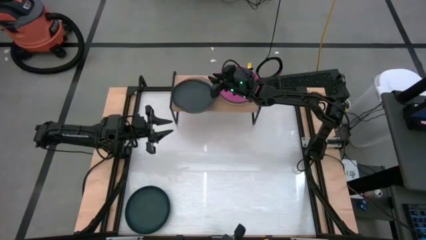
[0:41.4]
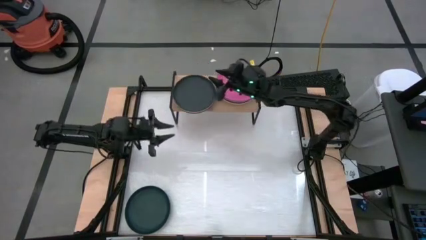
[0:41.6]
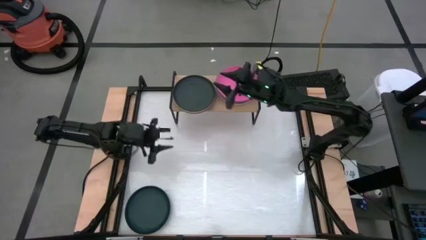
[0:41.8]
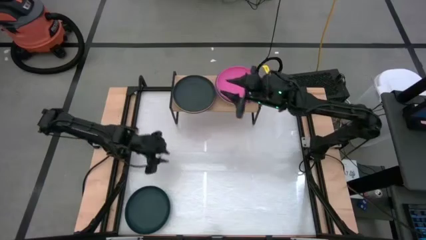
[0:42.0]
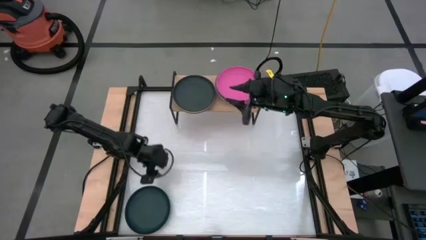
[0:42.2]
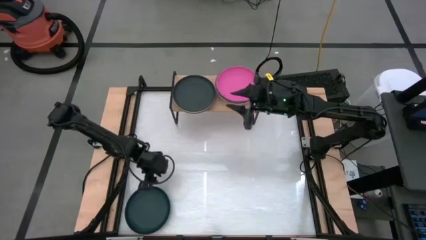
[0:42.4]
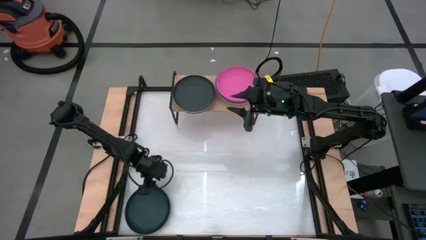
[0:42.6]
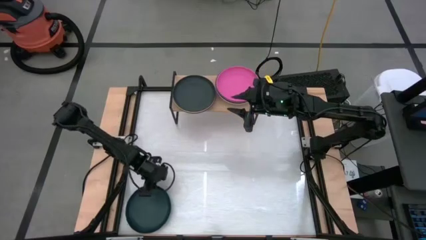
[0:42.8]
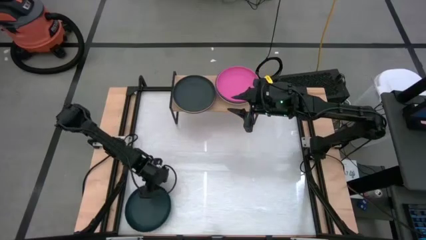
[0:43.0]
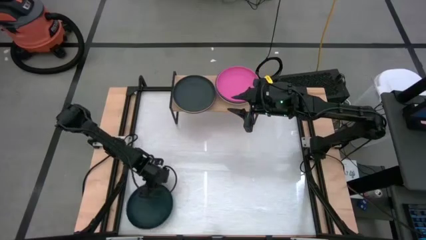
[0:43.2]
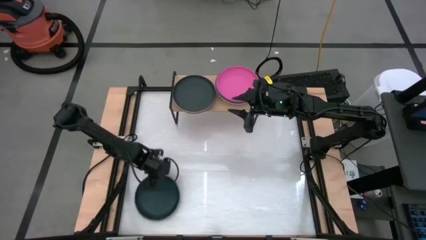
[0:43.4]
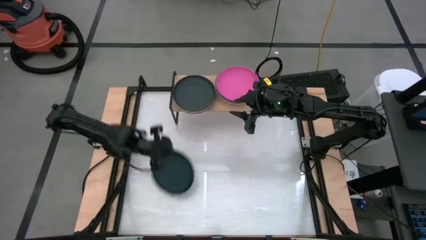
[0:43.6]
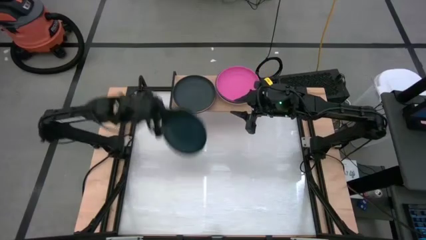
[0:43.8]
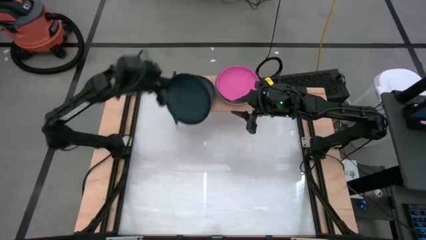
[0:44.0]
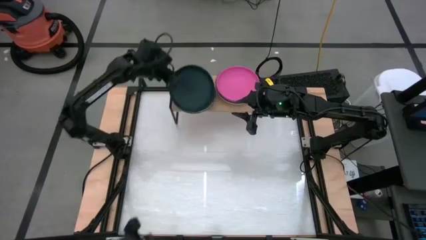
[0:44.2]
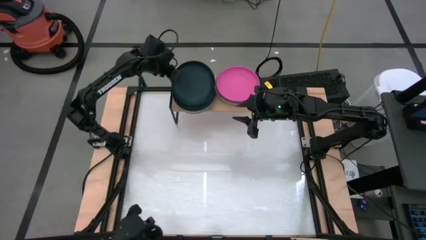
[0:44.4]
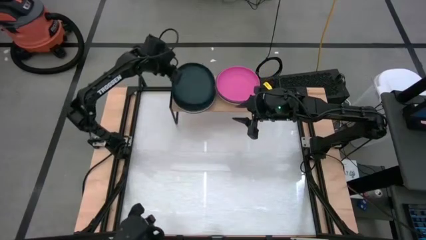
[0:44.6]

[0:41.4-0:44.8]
Task: Place and stack plates onto a shelf
Stack the black plate on top of the black plate on the shelf

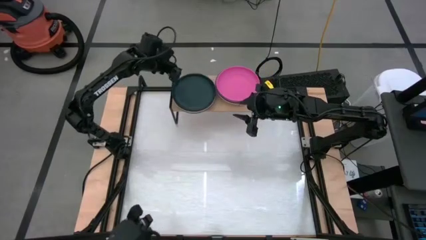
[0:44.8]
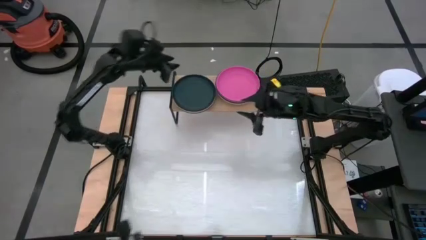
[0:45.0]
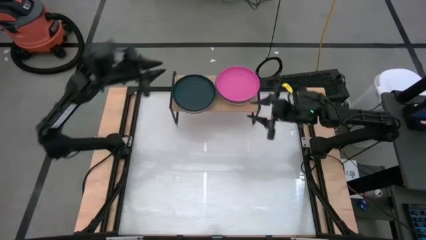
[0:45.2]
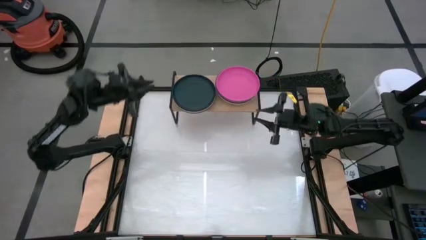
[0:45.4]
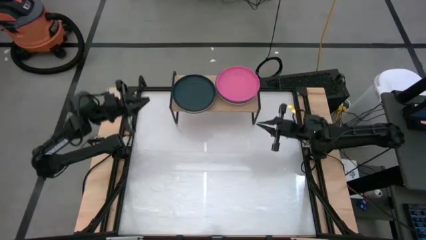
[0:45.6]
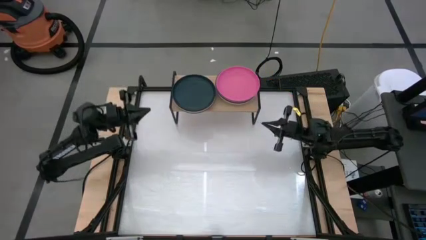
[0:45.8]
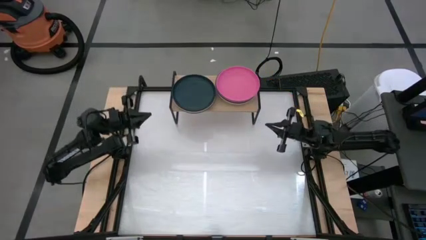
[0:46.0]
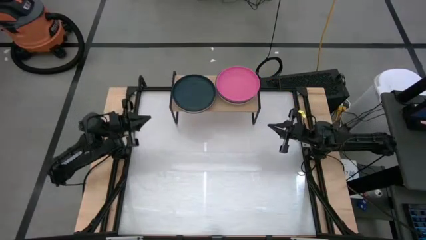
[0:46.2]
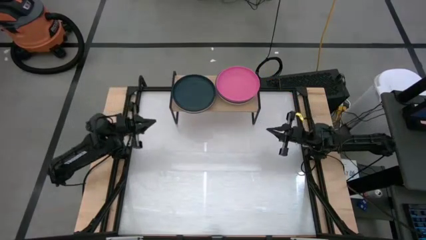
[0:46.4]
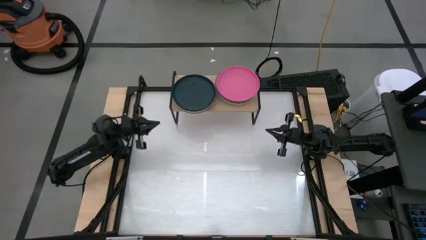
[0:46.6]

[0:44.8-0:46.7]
Return to Home Position

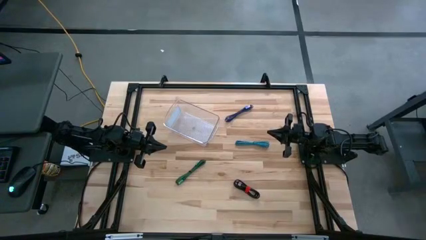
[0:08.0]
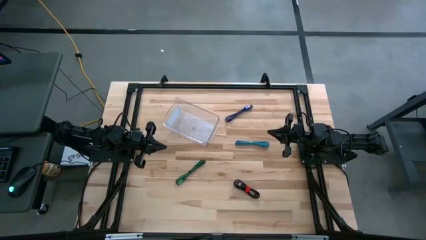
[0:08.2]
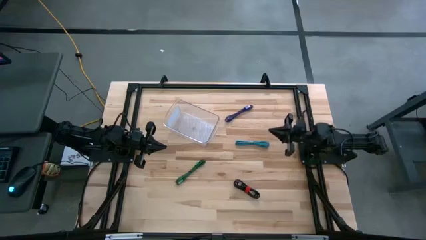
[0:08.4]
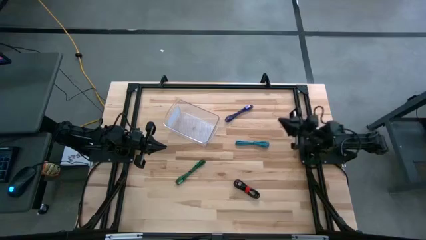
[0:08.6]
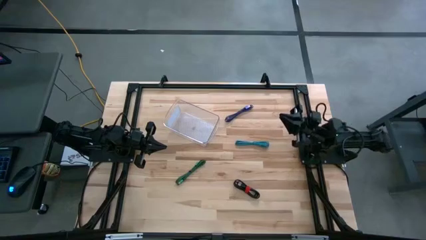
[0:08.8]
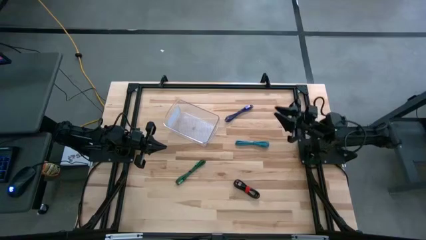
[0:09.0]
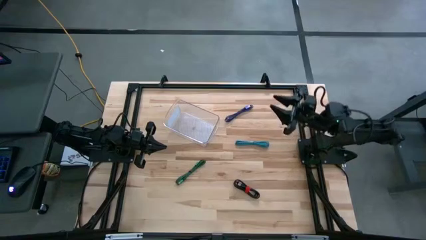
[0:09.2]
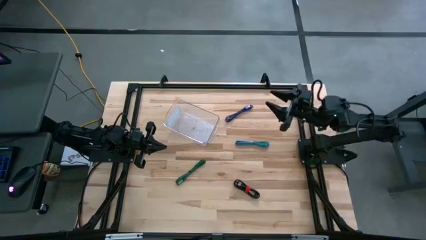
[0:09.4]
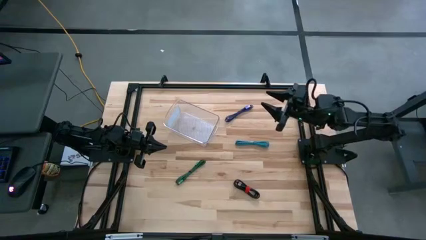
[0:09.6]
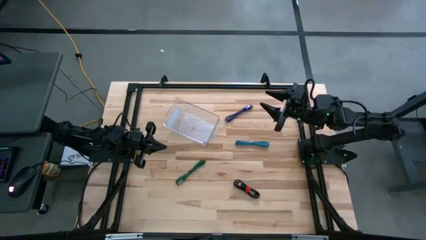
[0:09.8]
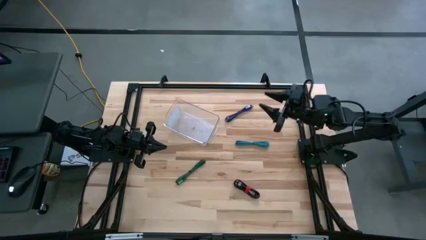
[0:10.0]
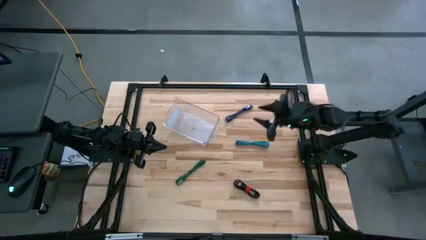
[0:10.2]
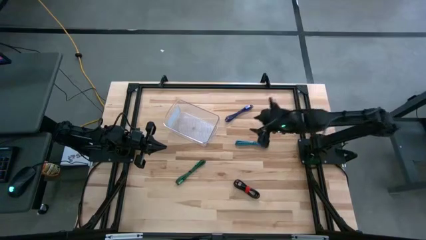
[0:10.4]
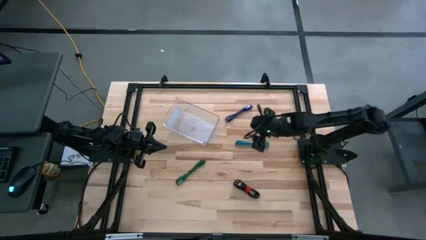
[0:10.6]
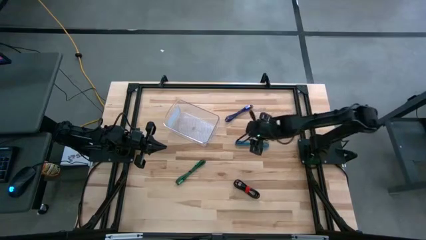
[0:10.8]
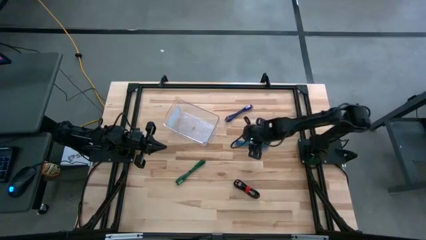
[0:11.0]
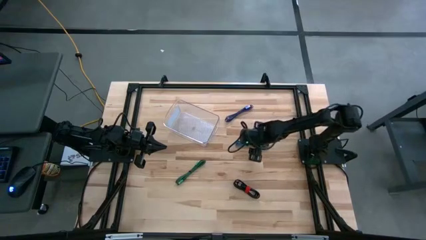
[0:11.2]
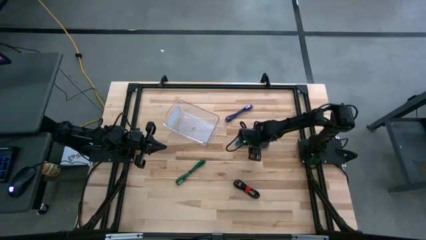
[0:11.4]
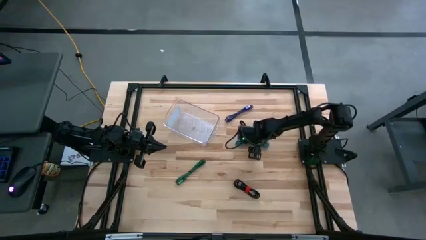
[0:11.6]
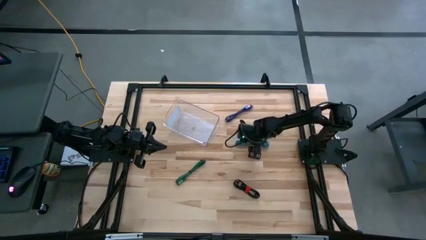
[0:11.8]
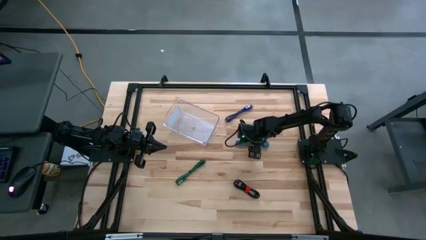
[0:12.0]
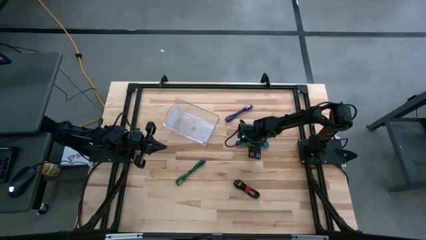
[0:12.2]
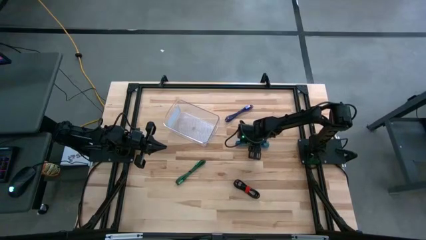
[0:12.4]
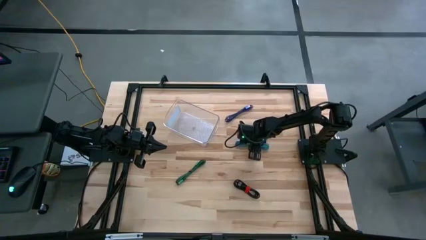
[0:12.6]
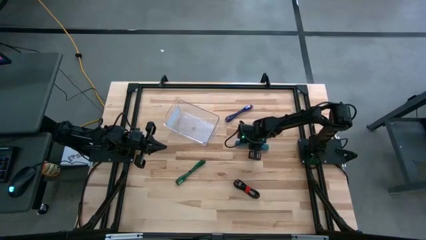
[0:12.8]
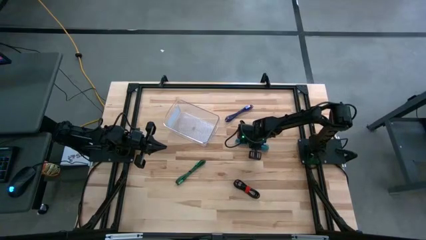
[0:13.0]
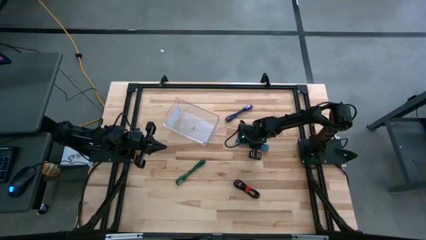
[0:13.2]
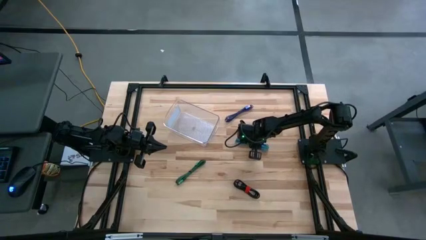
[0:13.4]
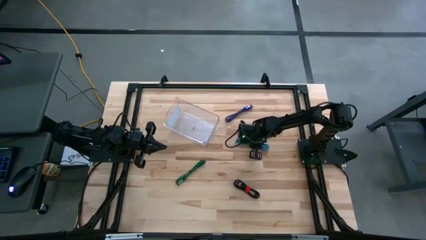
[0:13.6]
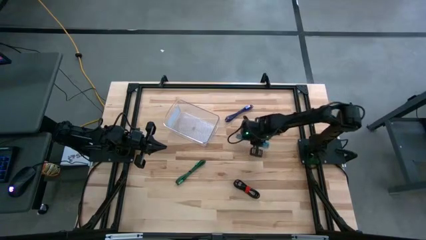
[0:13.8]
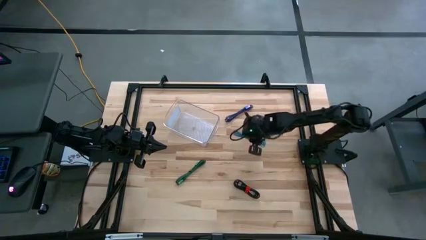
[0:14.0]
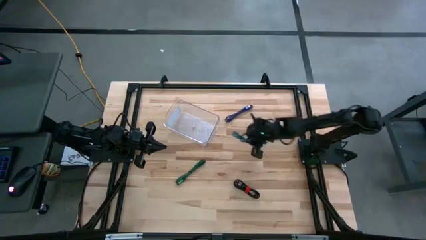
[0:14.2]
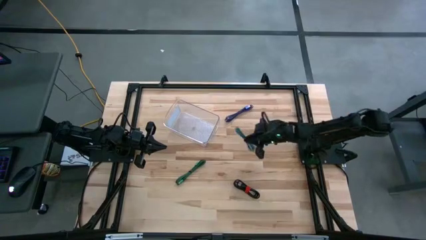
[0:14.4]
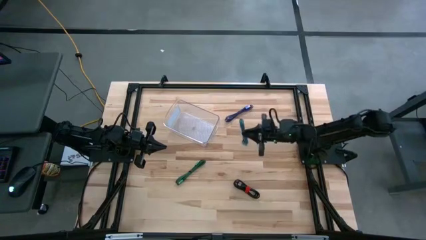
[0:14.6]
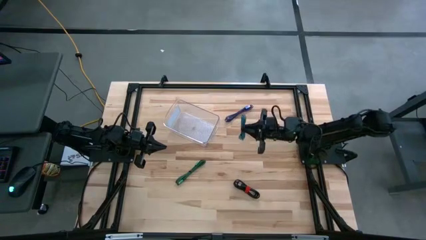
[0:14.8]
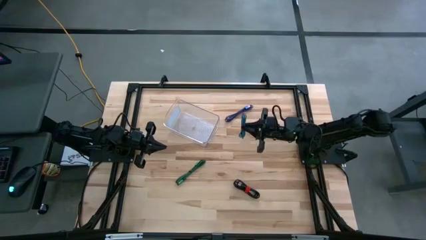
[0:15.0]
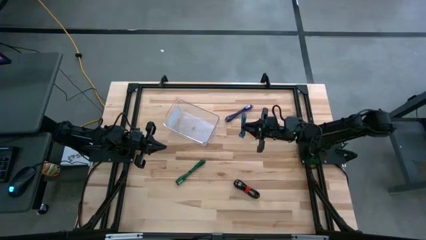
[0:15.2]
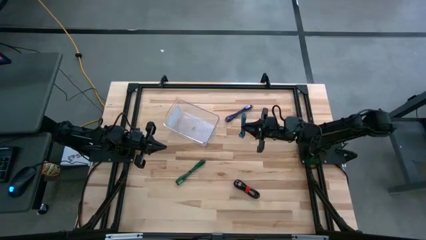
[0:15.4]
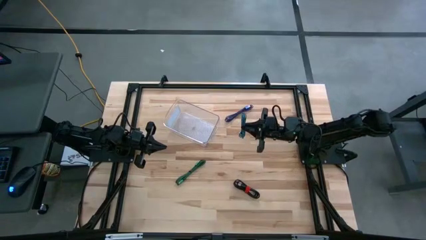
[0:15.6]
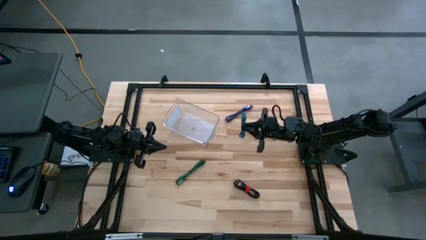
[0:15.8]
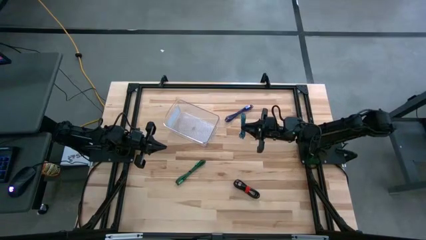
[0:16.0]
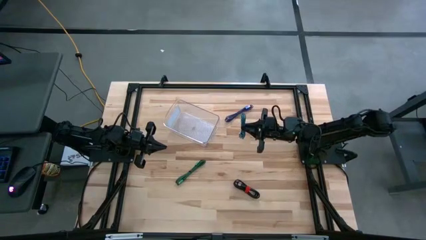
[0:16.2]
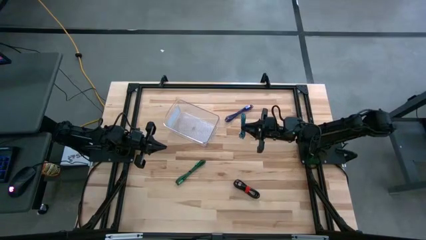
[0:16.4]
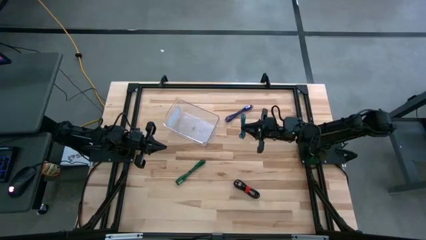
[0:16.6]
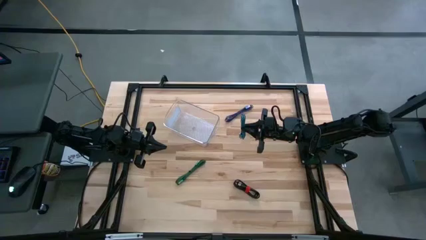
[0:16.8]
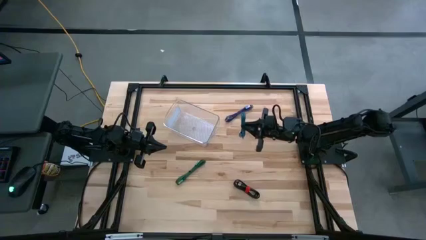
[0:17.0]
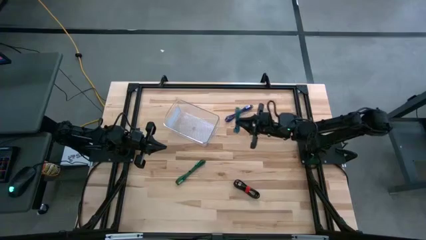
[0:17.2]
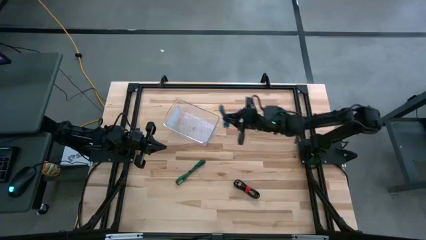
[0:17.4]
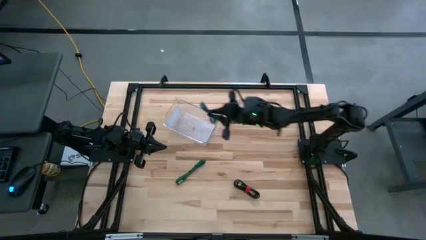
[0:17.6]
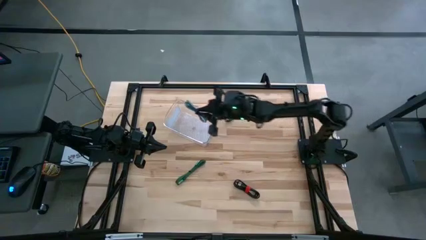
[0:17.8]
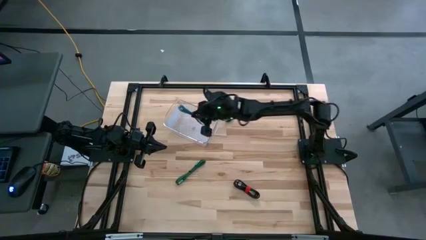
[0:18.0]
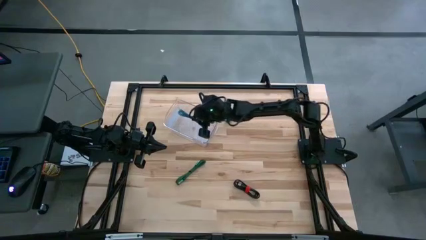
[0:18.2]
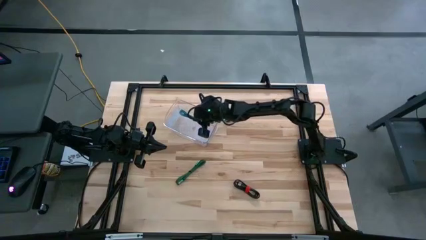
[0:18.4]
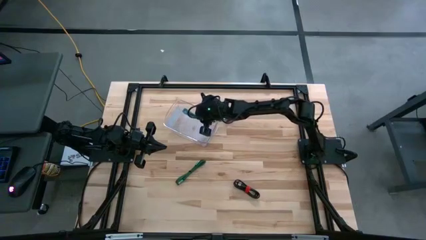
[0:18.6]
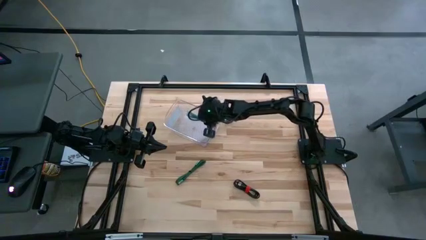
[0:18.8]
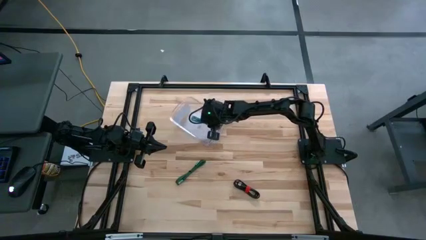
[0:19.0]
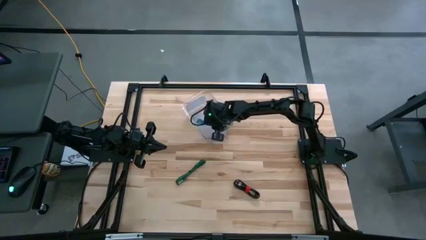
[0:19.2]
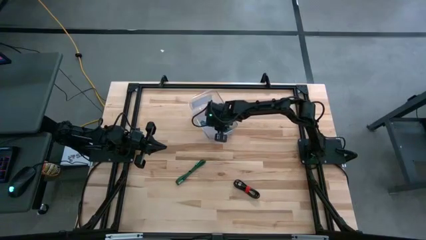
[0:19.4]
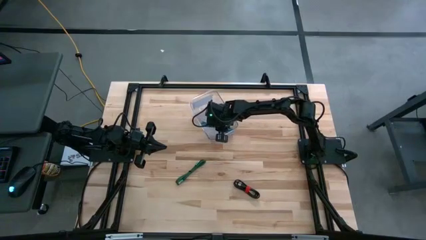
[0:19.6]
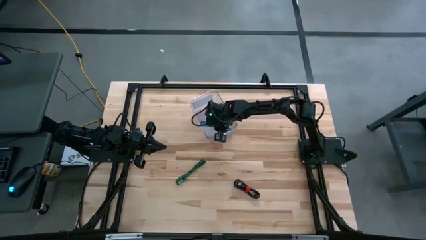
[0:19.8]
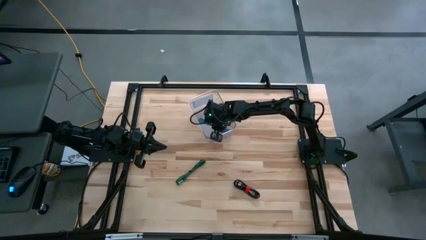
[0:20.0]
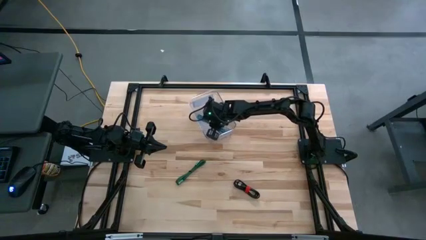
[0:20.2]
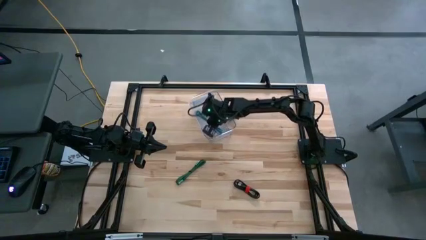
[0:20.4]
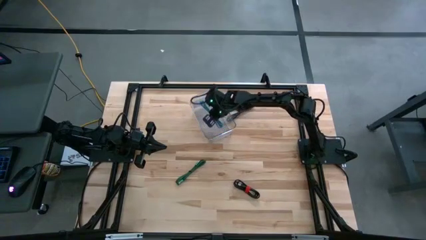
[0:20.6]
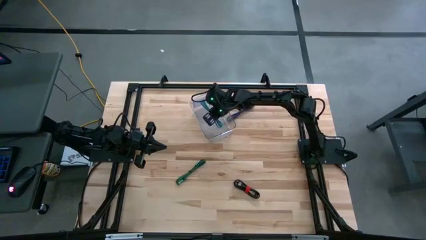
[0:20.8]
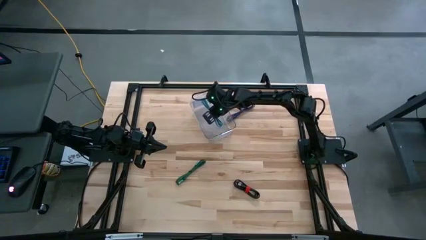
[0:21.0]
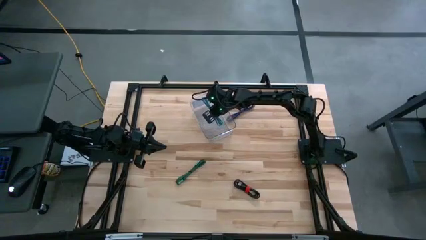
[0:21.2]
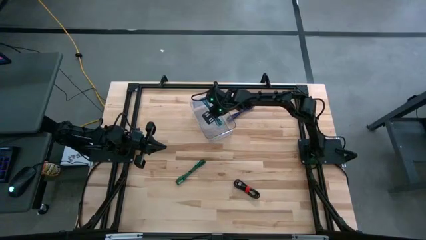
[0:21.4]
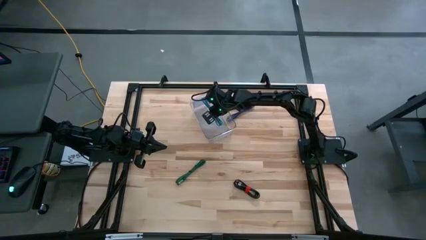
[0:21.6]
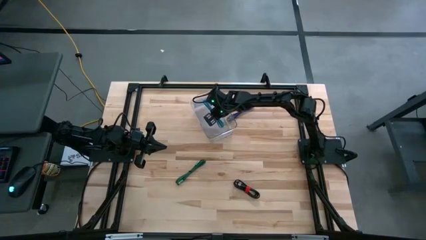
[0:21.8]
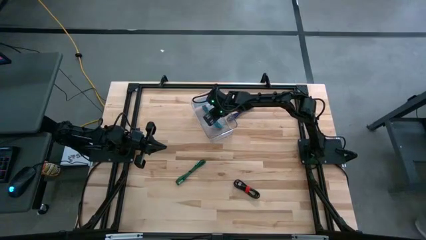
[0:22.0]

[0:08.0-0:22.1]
Task: Pick and place USB-C Cables
Put the light blue charger cable into the transparent bin
